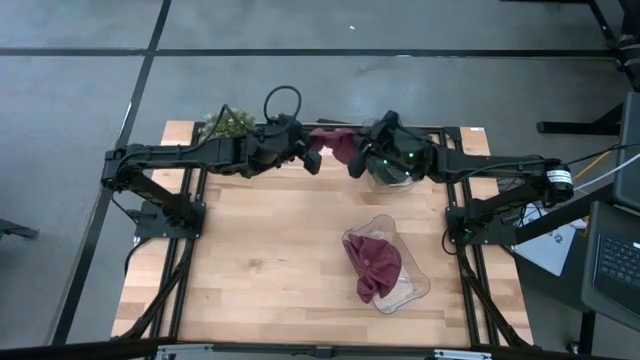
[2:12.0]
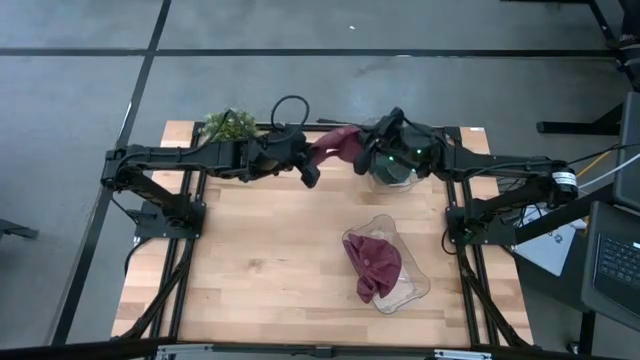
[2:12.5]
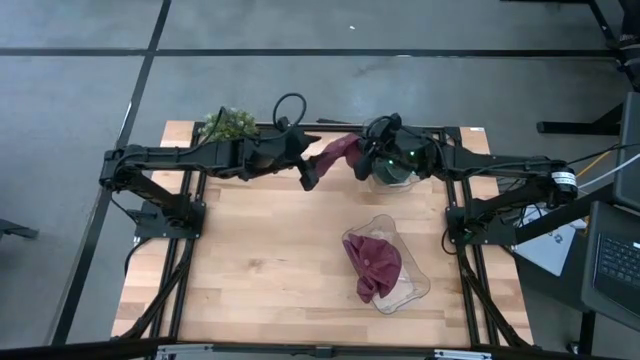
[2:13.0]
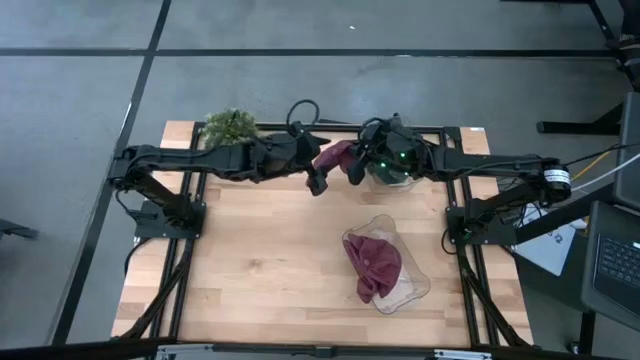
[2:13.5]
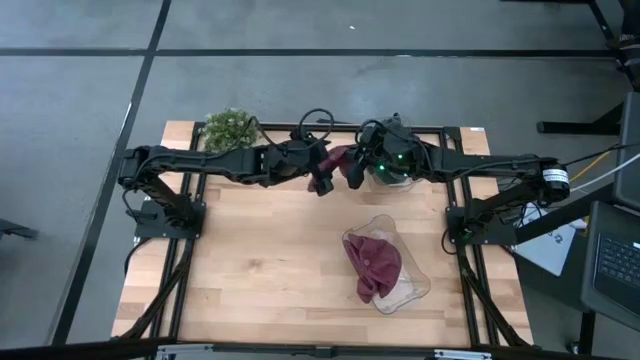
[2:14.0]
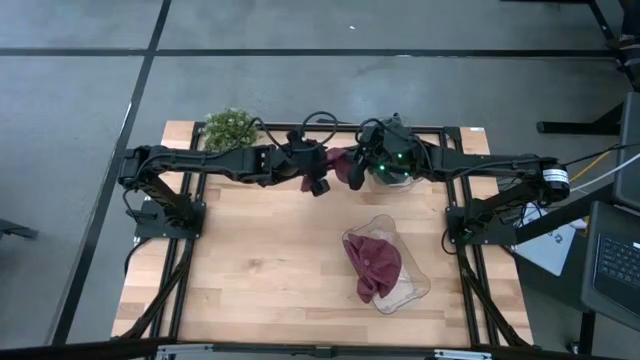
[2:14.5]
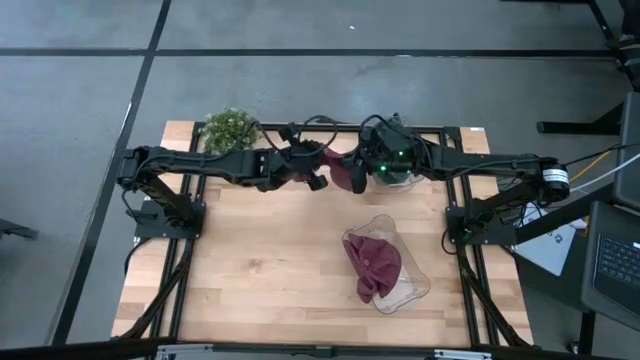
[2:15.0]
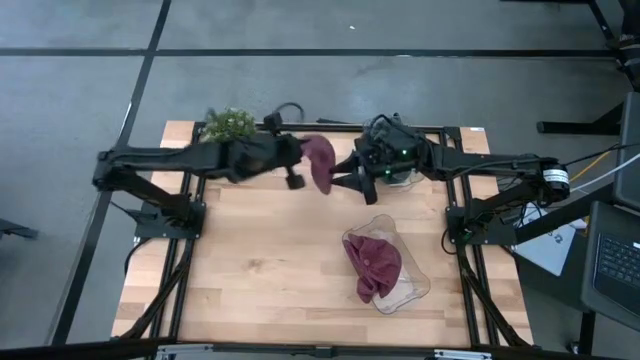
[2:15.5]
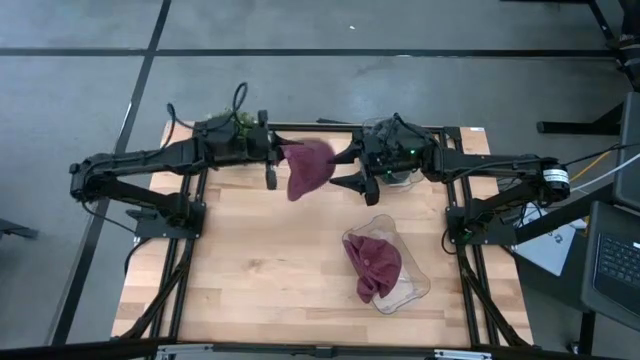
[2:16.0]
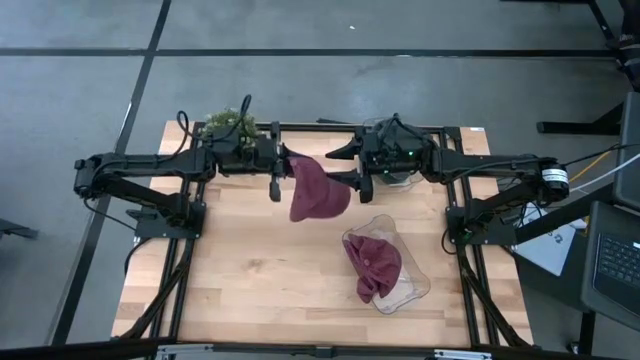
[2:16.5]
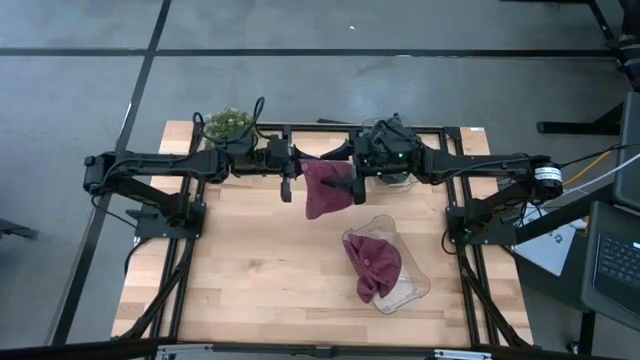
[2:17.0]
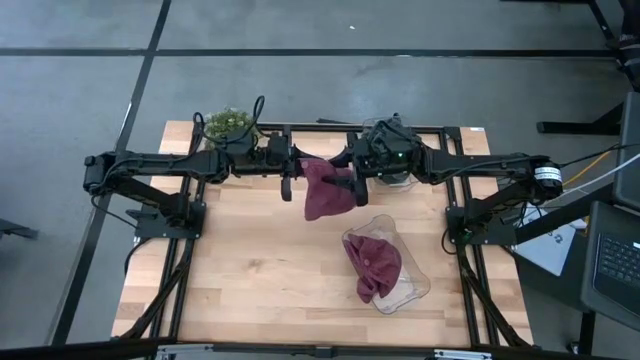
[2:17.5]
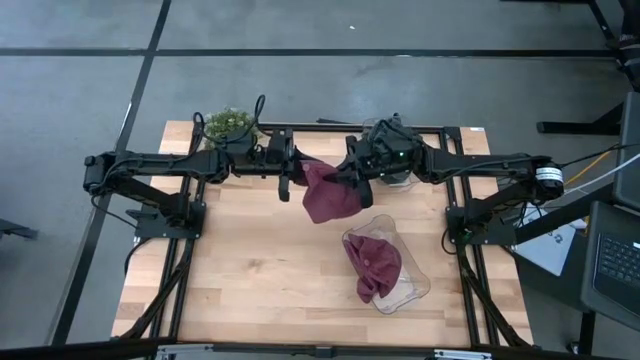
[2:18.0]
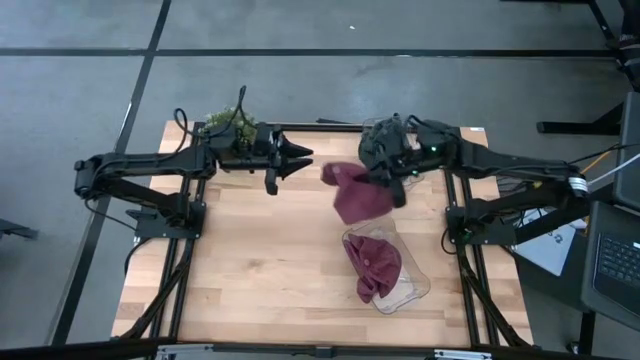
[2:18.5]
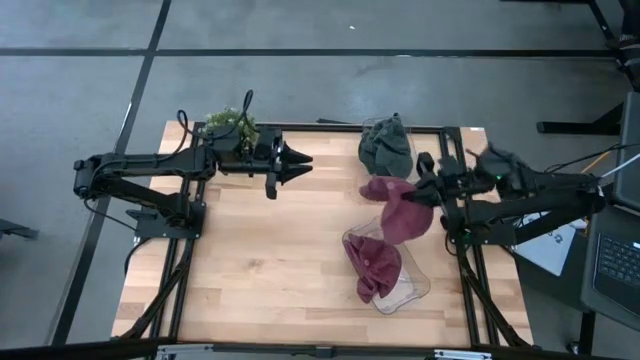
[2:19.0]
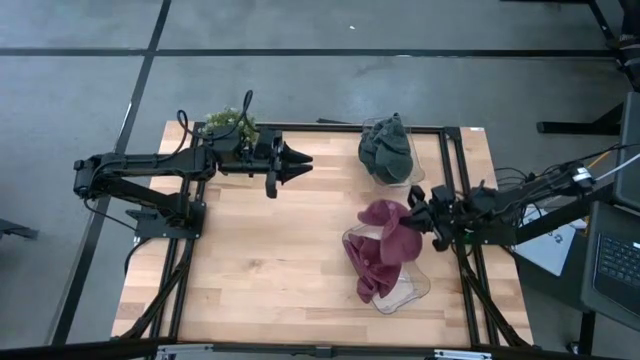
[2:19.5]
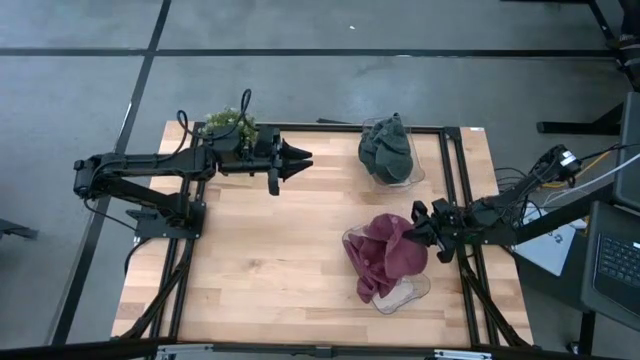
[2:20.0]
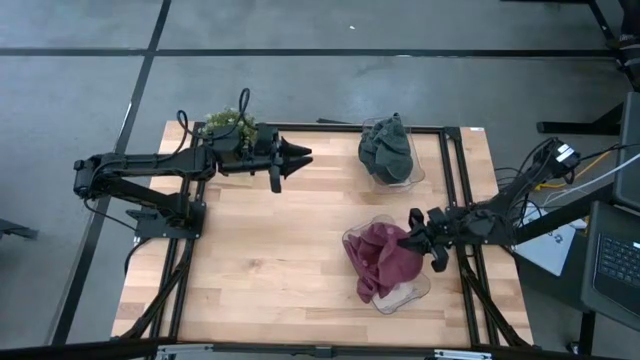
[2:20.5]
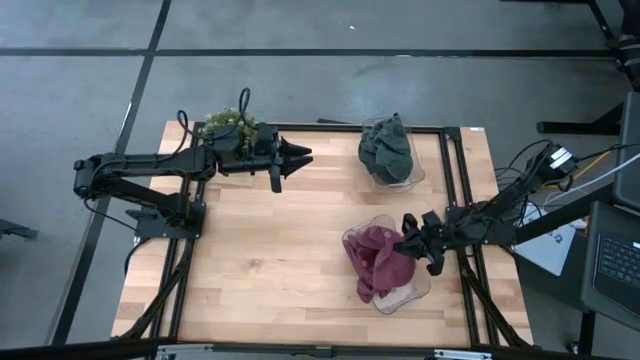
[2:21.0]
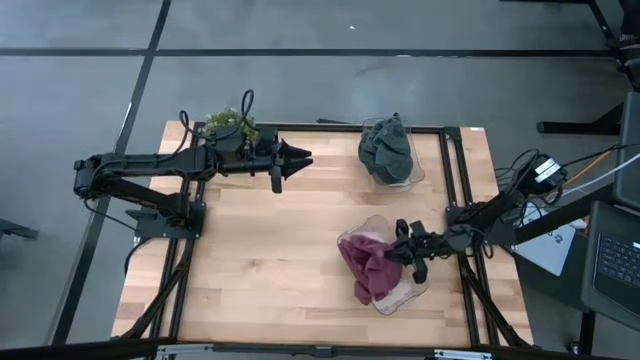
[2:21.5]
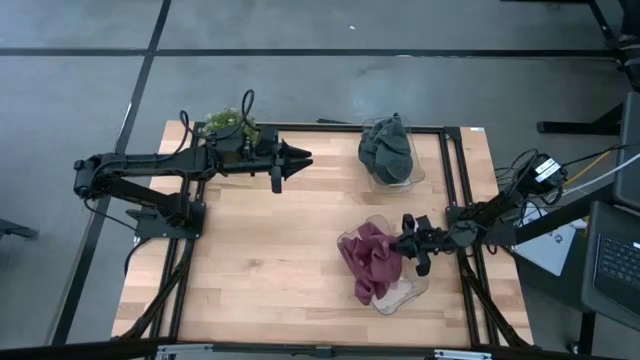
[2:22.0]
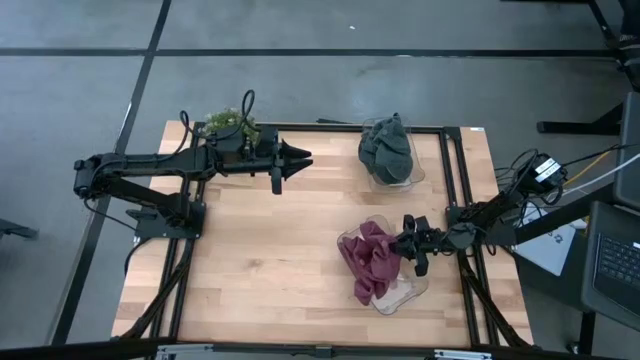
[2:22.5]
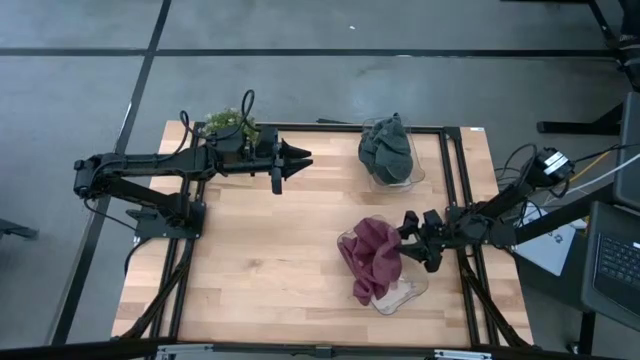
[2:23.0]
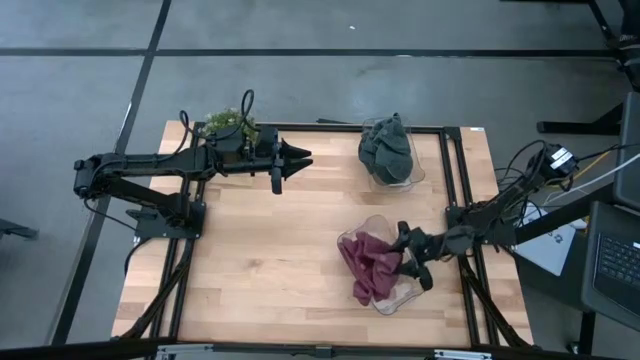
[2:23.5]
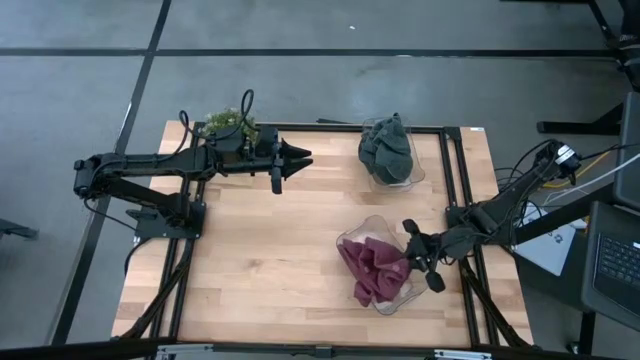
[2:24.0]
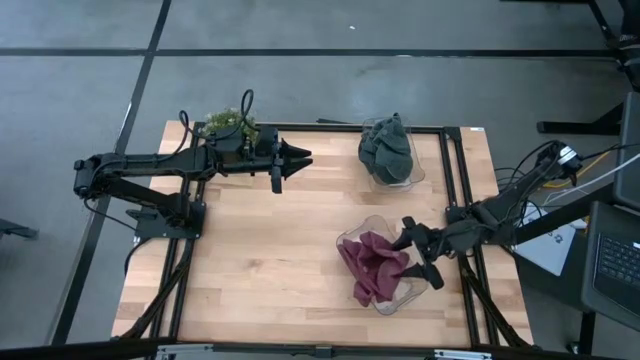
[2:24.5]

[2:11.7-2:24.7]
Task: Pick & Place hat
Put the red cap into the bottom transparent bin

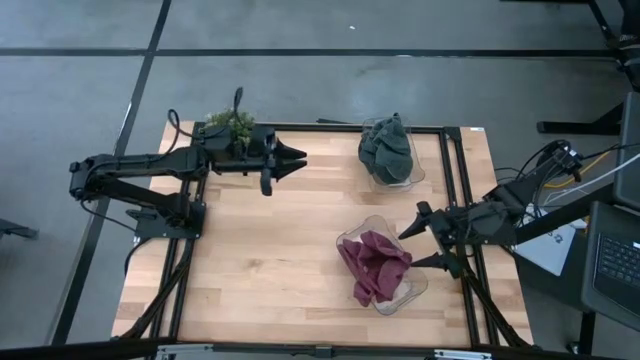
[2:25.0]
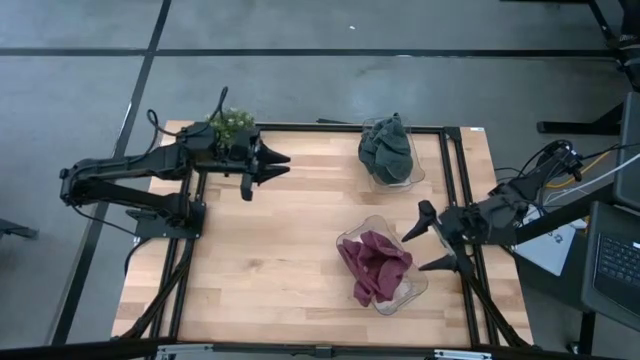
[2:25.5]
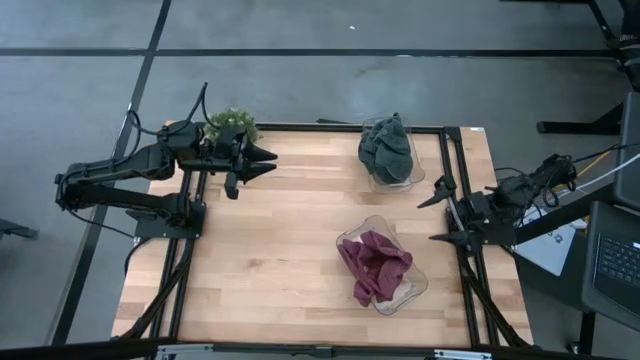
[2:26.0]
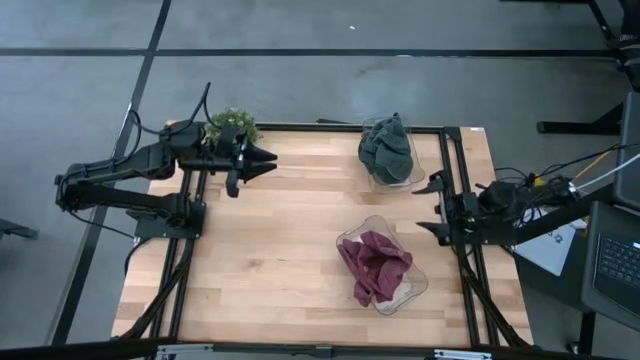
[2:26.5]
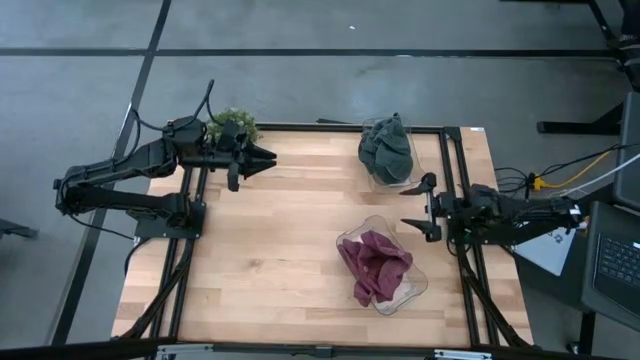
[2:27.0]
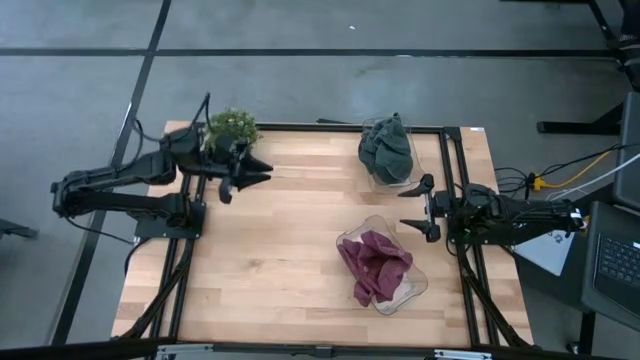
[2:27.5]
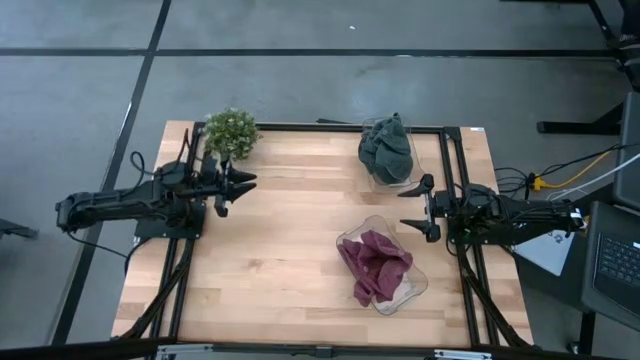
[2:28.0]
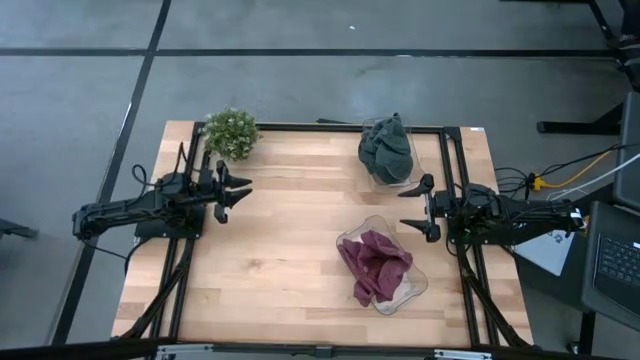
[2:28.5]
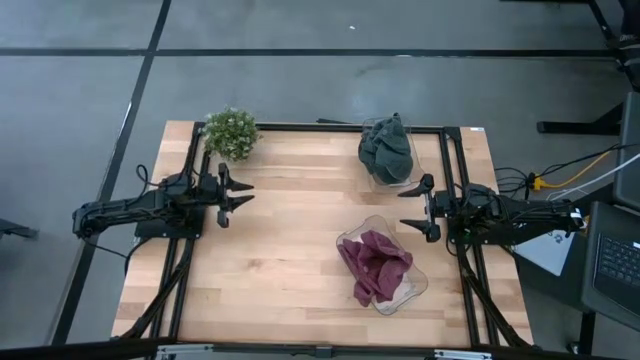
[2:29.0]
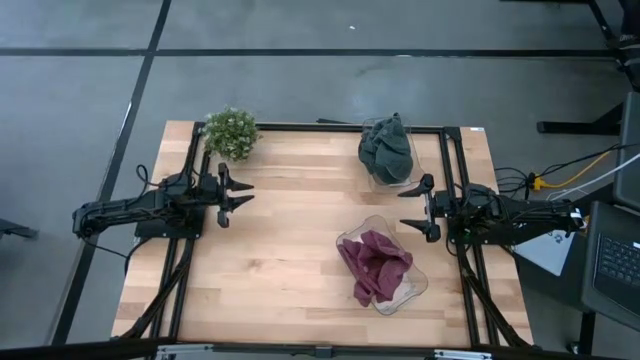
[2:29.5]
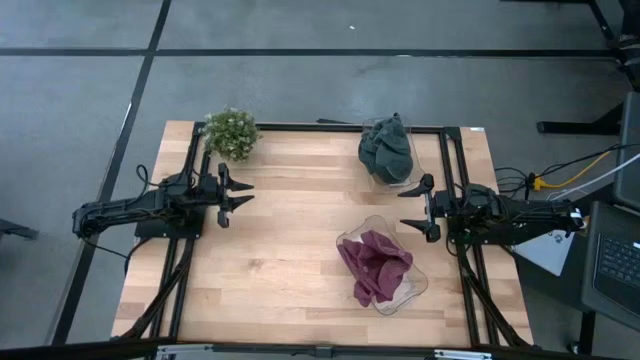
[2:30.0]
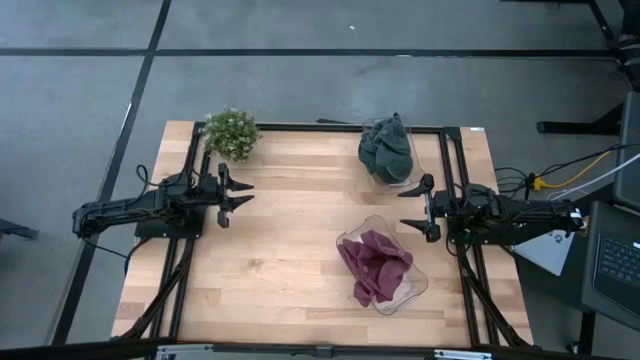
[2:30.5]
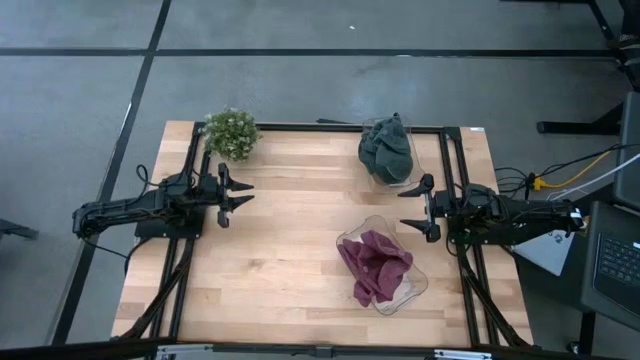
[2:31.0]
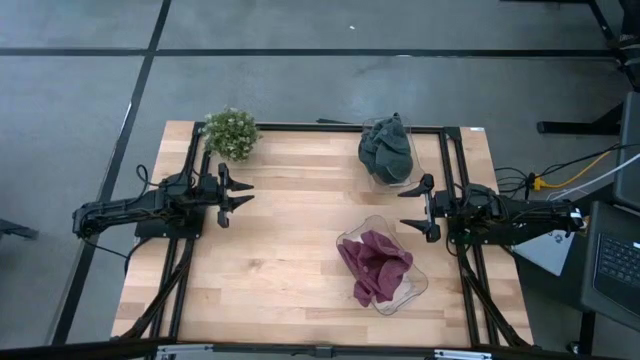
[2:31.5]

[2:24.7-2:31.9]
Return to Home Position

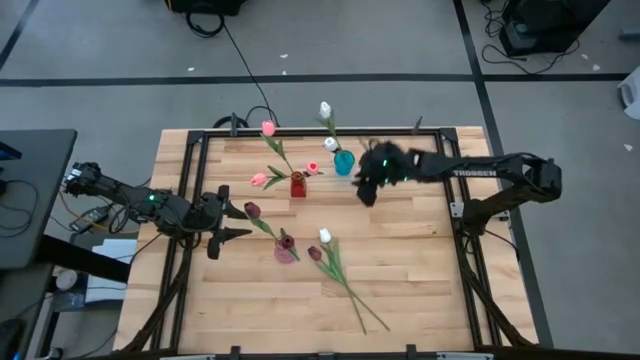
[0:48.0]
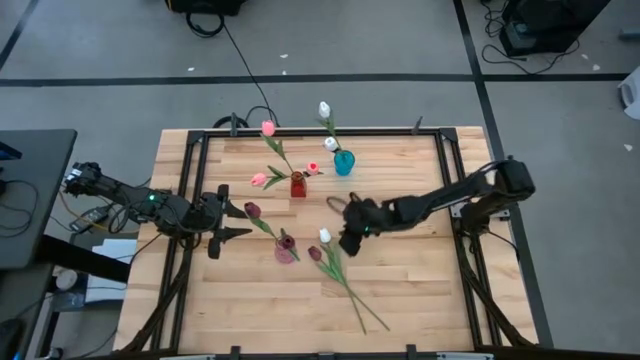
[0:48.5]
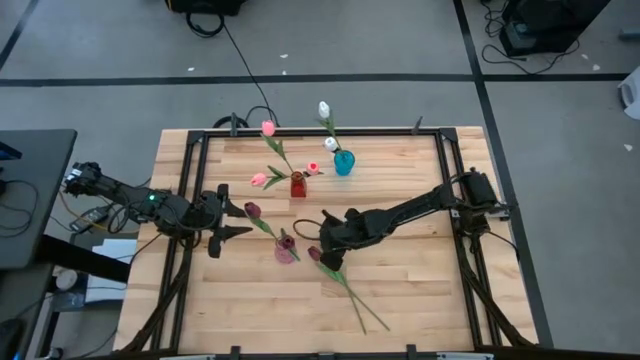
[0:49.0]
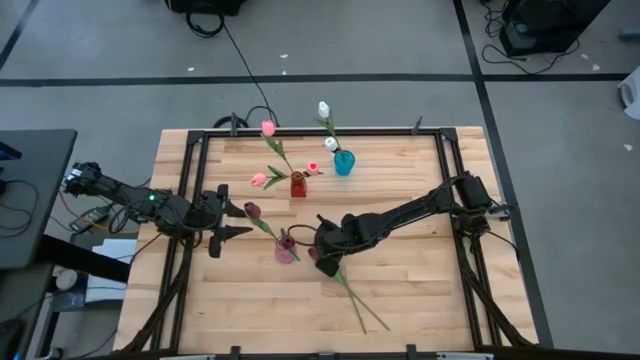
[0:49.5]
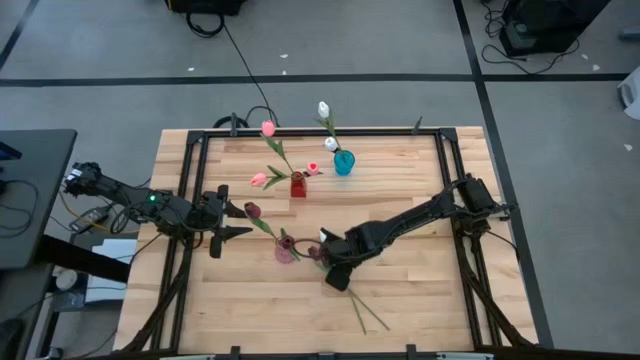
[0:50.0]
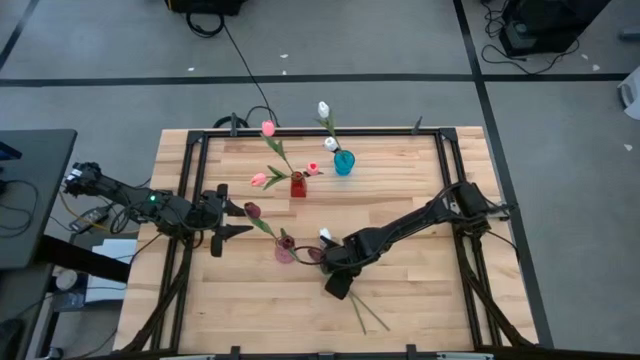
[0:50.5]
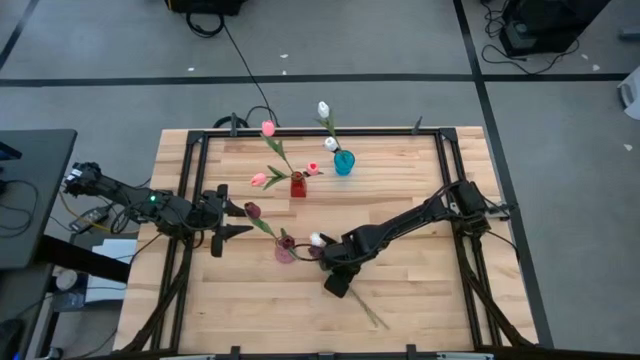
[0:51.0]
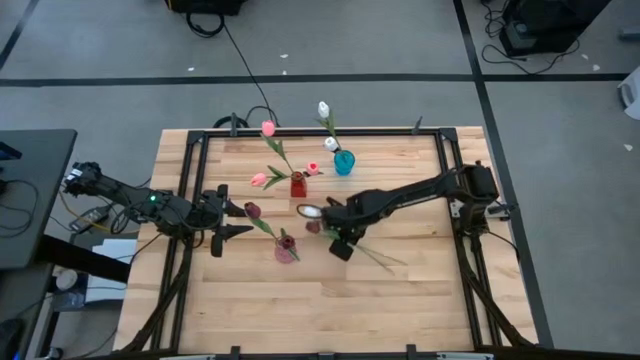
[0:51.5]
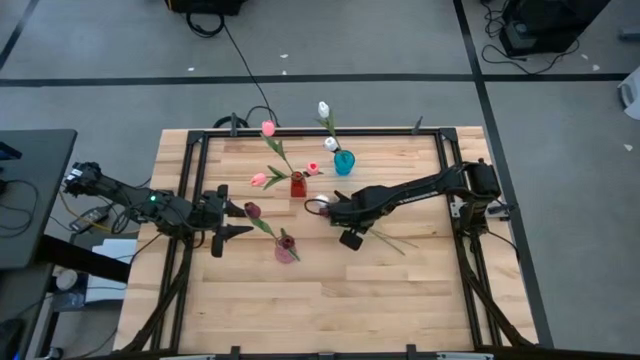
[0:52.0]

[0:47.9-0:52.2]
Task: Sort flowers into vase by color
Put the white flower into the blue vase
